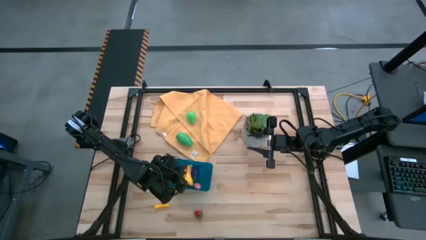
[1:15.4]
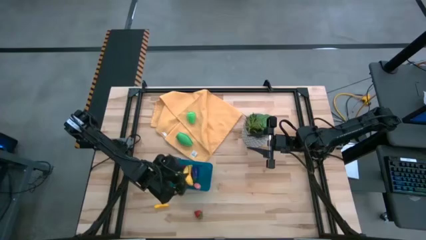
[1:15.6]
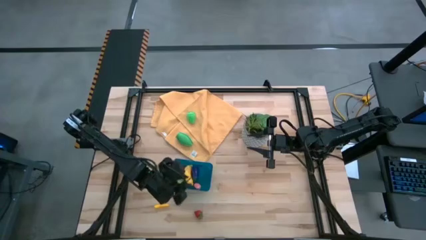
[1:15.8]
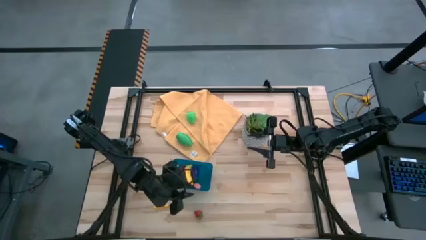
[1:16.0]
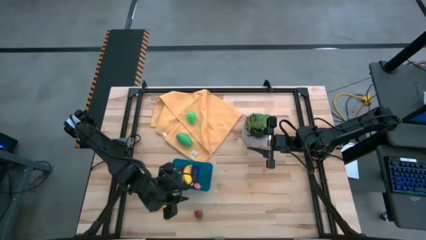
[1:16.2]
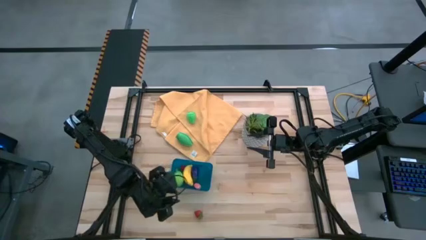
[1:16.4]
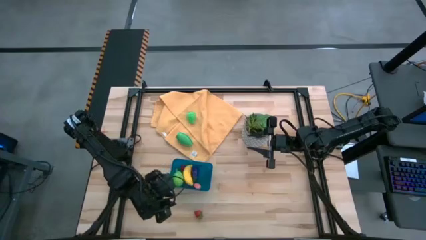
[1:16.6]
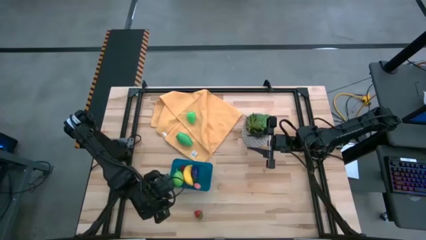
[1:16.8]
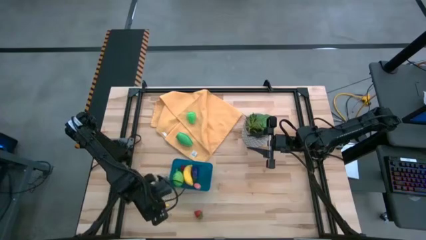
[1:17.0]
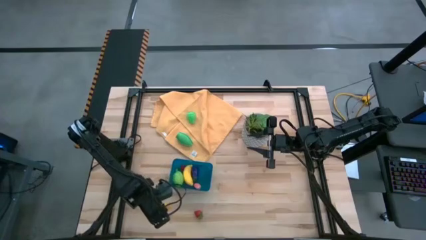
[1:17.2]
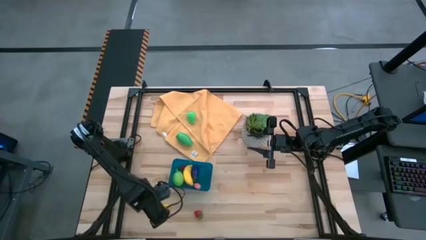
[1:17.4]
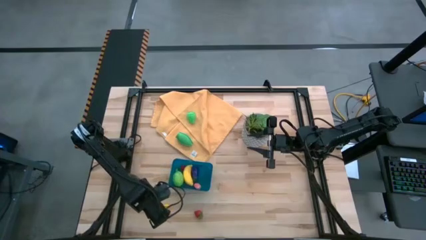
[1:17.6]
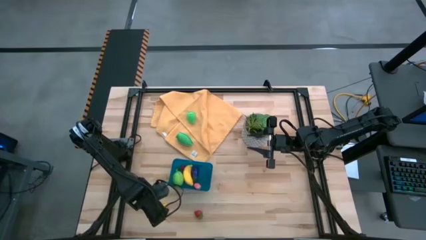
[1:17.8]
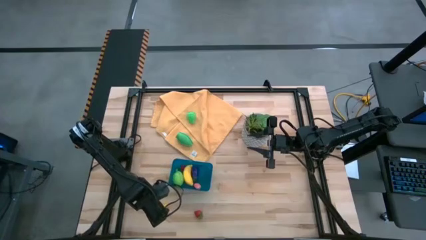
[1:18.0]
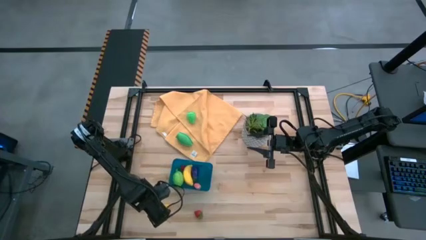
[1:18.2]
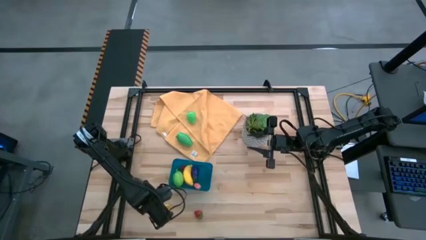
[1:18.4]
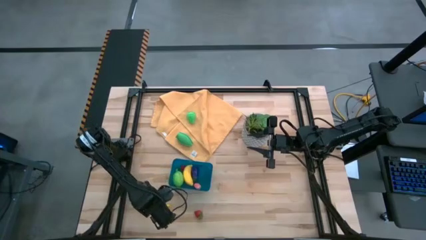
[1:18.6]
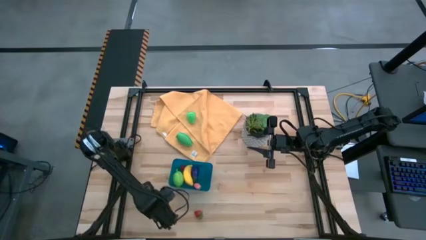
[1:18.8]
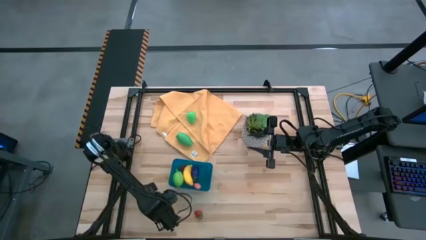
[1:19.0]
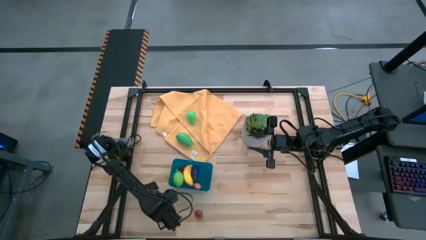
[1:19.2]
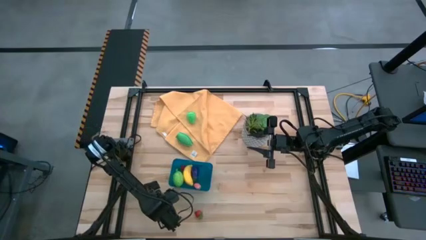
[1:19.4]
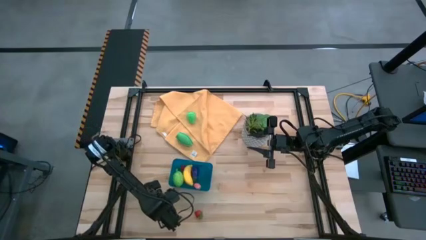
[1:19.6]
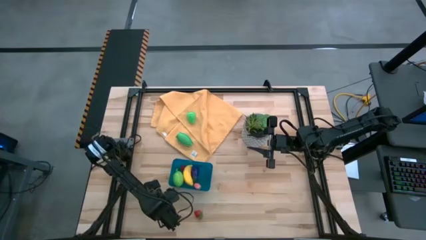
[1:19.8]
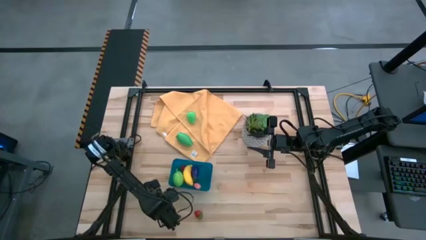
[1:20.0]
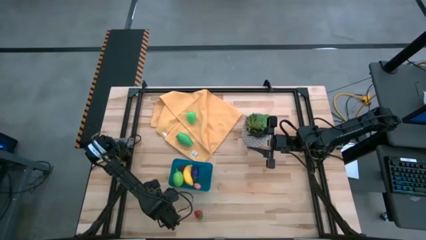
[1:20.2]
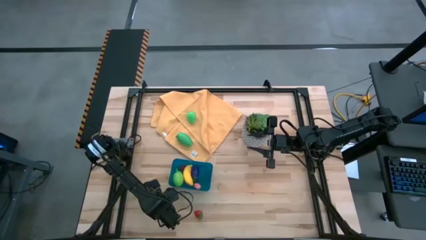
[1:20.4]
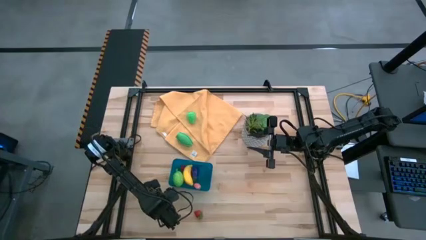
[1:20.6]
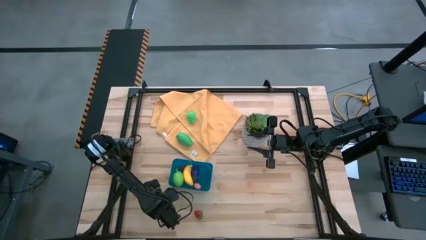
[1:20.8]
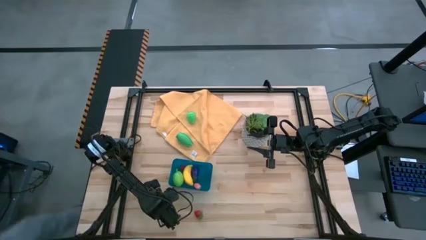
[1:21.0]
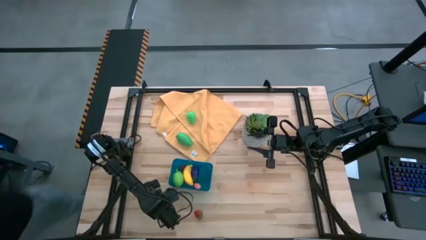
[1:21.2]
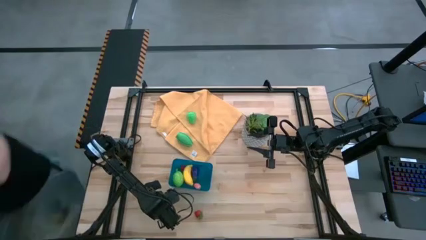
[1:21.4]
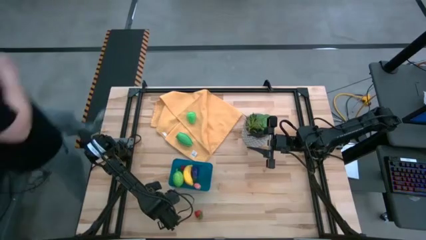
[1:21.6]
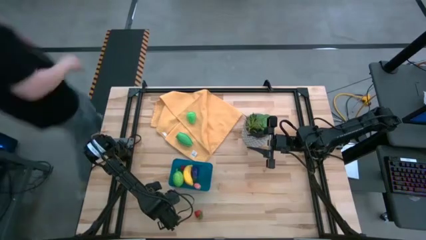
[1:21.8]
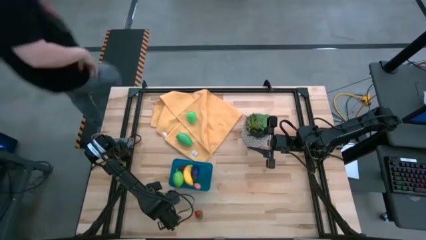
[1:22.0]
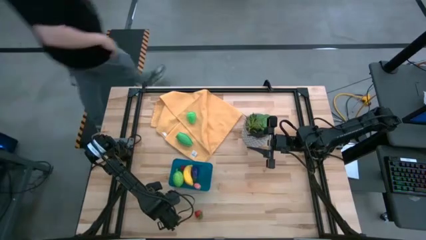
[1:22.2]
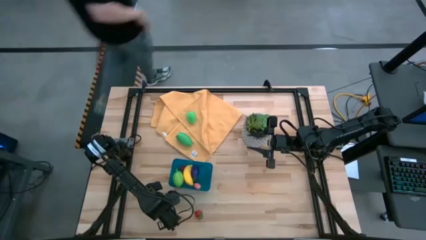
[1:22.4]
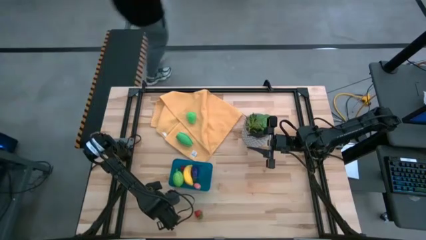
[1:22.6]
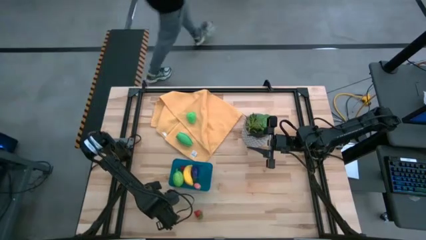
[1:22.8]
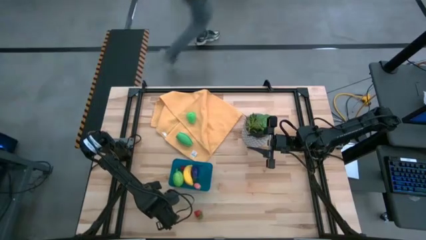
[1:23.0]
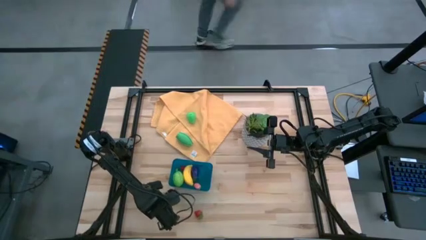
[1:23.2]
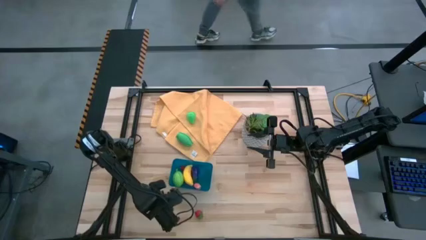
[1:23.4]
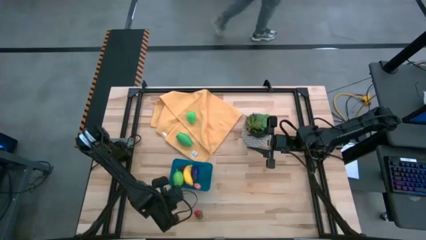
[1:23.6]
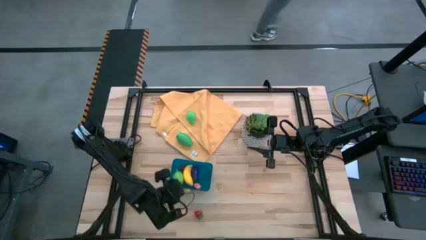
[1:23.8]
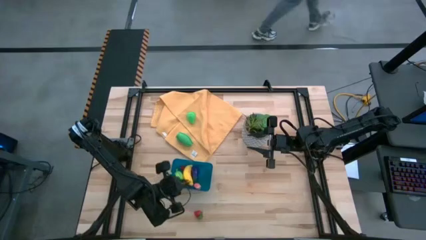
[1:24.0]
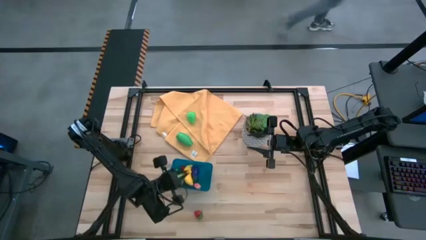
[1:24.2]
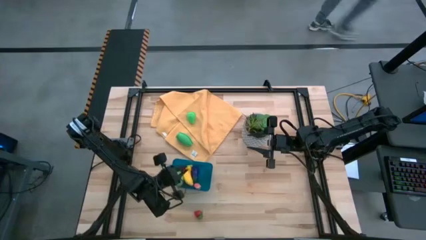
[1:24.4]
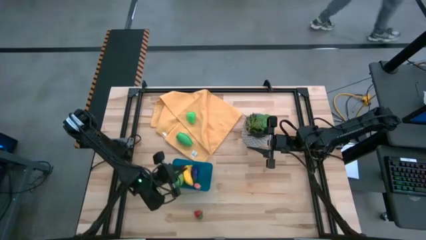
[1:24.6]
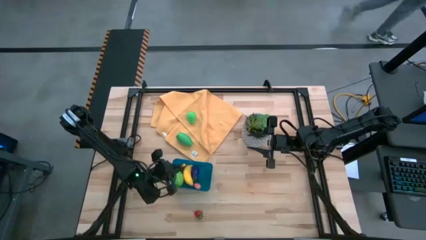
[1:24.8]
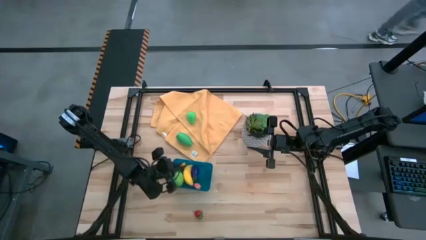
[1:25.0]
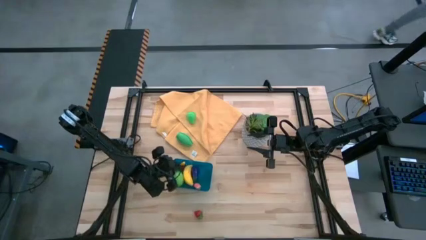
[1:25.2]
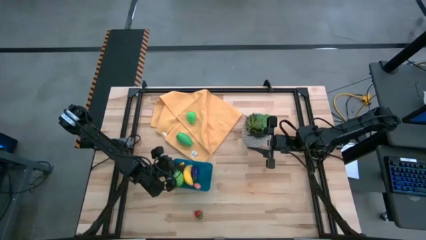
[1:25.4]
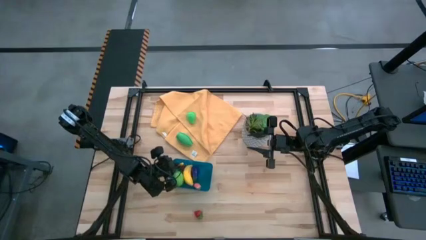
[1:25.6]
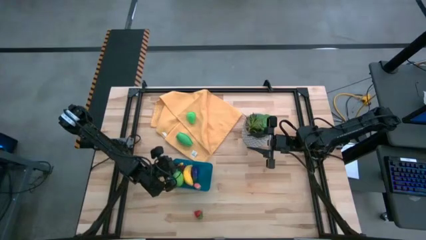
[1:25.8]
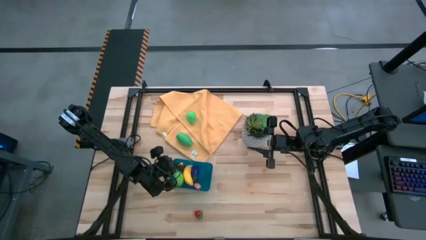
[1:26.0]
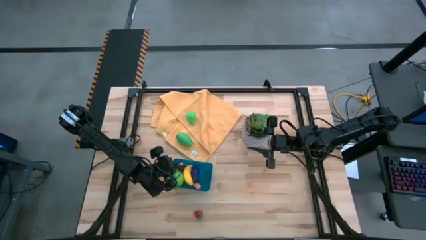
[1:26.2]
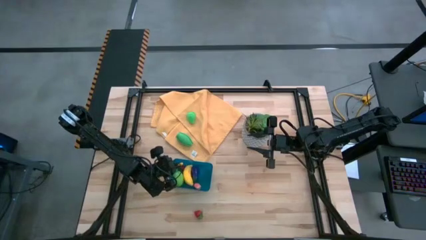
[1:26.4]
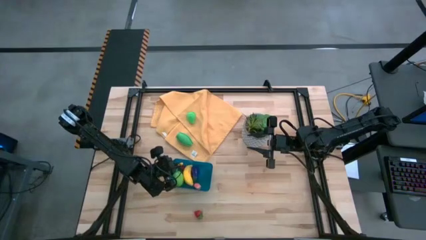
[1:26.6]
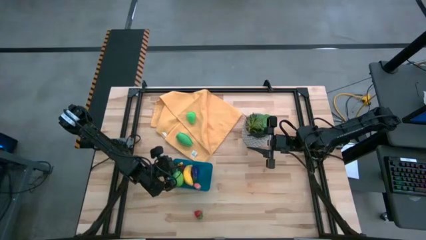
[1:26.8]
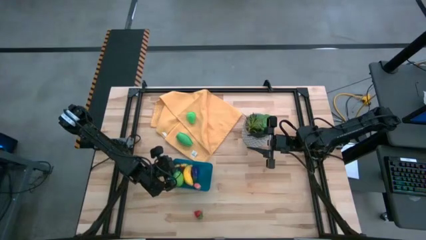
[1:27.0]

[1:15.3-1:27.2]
Task: Pick and placing Produce into tupperware
Put the yellow zucchini into the blue bin

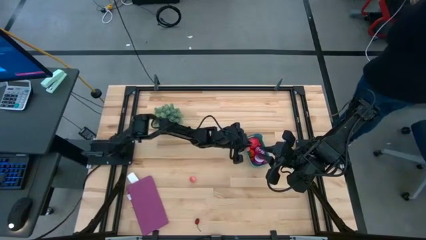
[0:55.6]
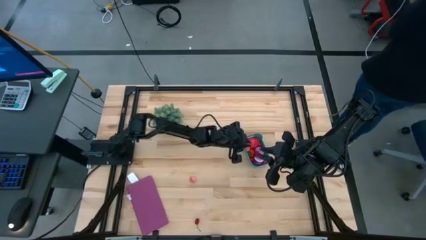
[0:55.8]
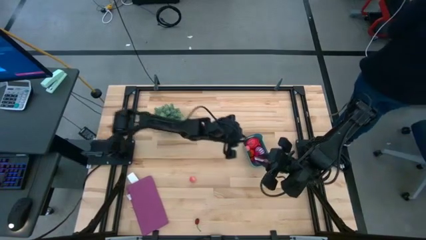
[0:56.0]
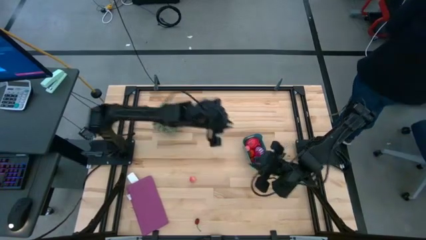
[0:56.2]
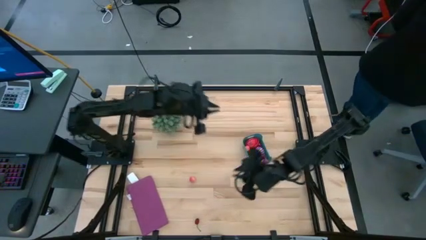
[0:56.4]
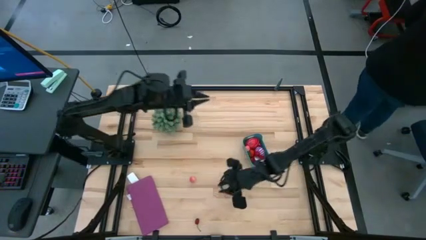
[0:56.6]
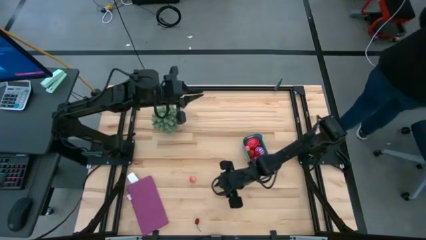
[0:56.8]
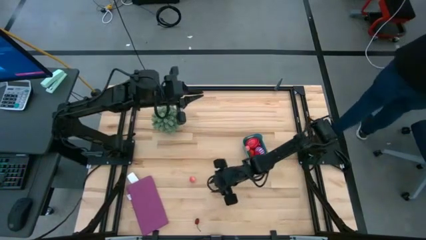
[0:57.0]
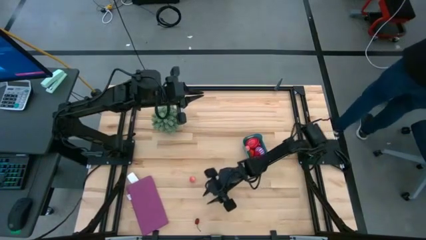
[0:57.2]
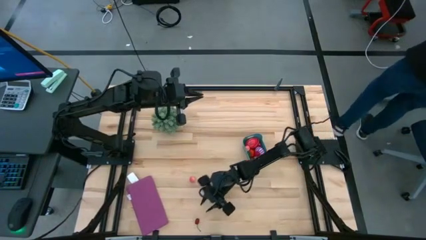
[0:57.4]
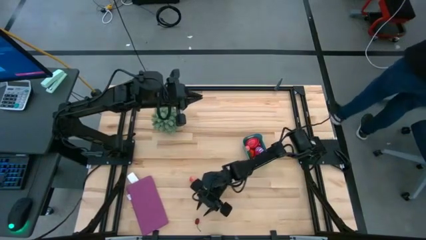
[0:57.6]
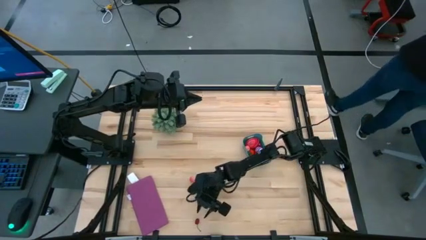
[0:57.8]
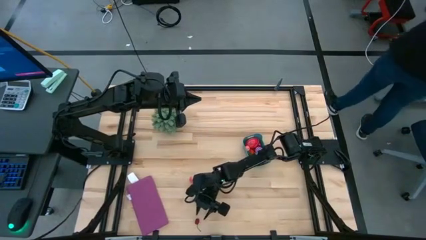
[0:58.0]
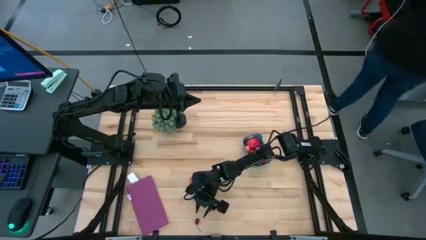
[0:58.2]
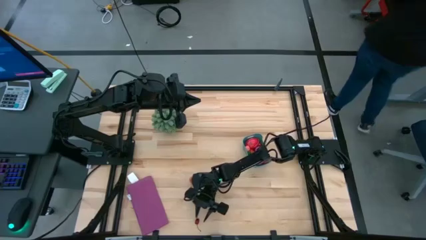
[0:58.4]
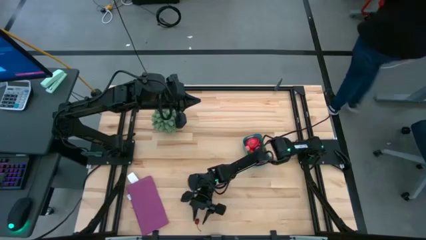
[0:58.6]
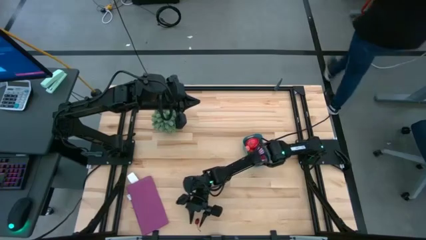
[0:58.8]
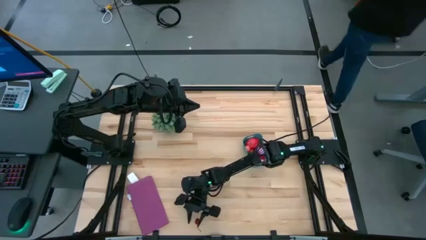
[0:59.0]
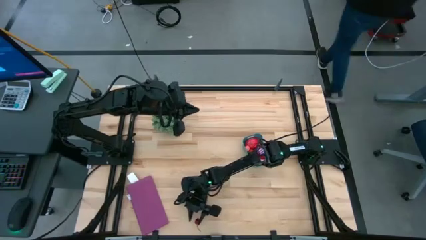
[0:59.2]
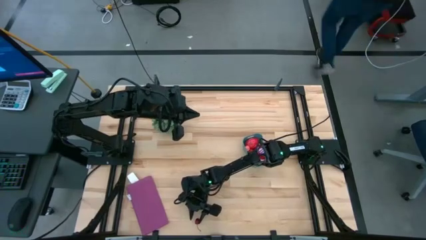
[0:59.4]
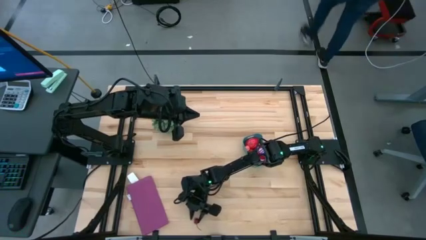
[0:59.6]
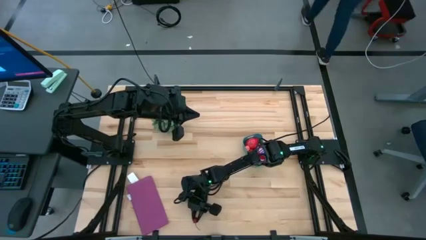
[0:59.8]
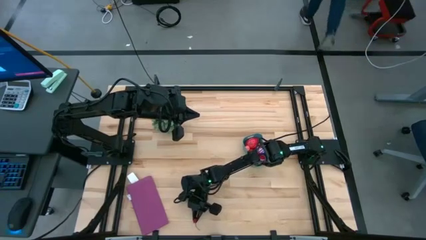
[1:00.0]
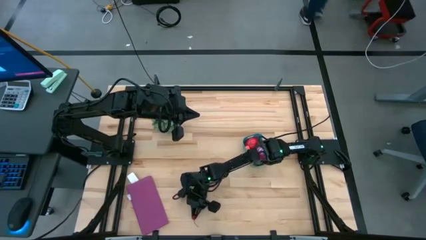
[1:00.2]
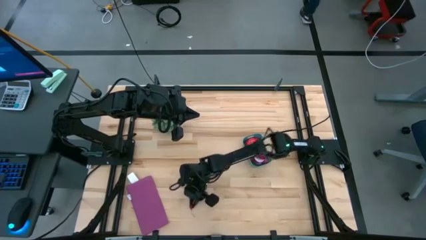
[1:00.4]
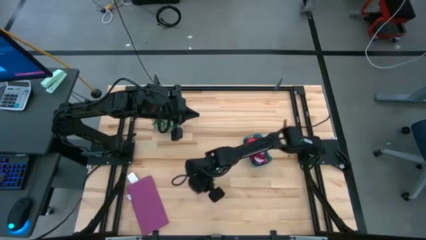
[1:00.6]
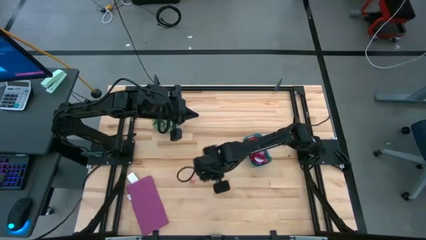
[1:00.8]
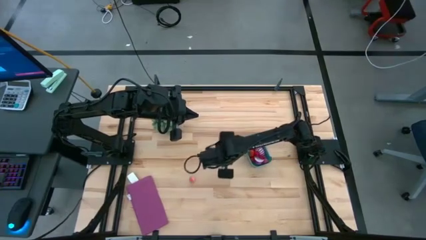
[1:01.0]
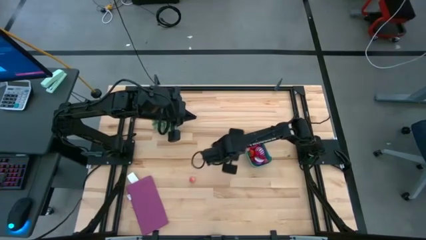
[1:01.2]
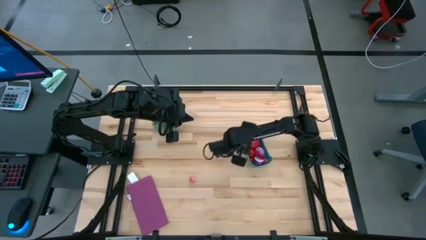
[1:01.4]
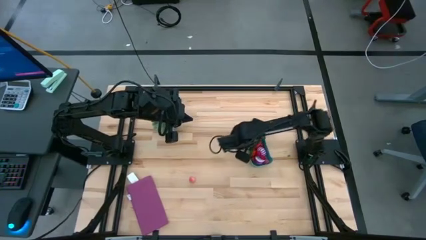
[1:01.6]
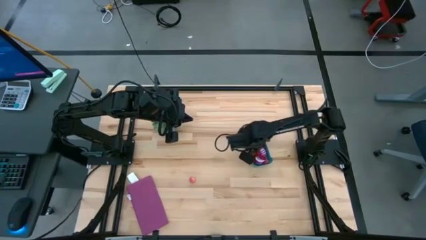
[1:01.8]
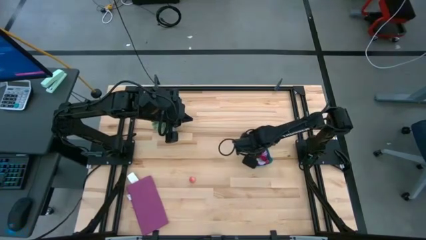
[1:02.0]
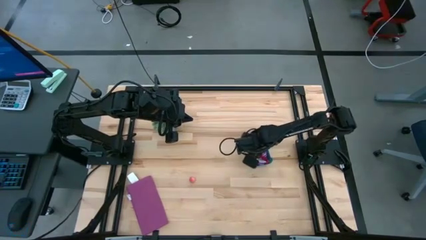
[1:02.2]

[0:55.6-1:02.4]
Task: Pick and placing Produce into tupperware
Put the cherry in the basket
